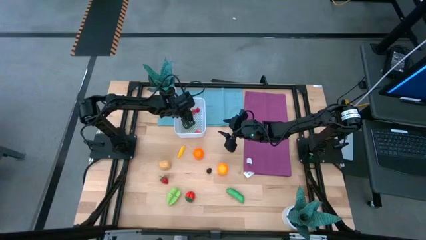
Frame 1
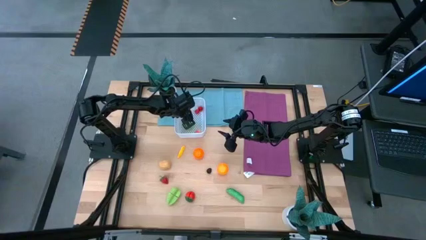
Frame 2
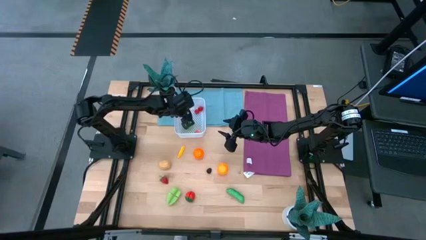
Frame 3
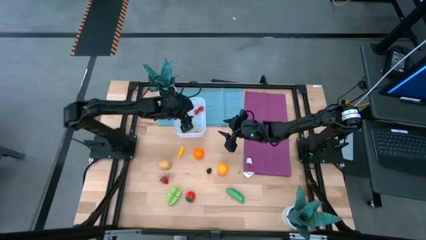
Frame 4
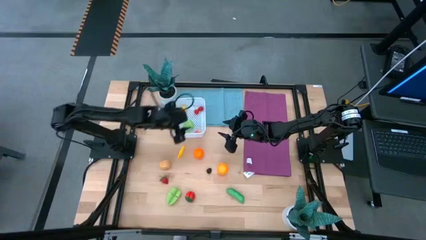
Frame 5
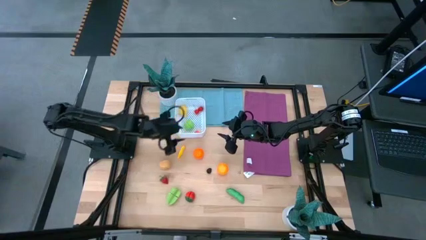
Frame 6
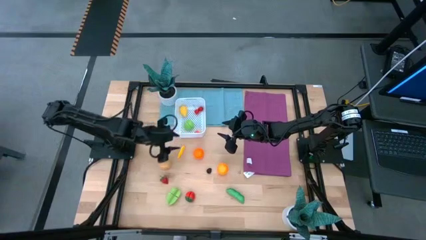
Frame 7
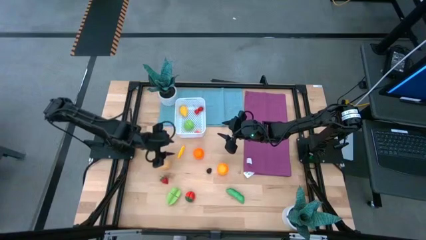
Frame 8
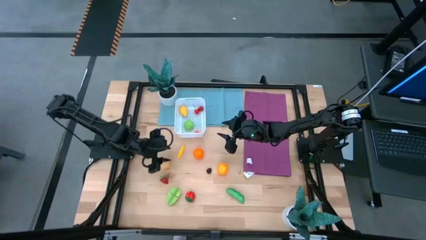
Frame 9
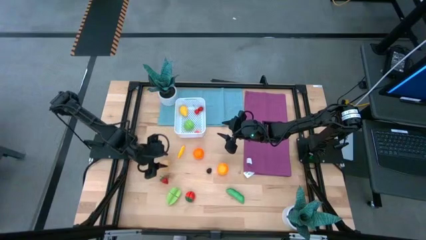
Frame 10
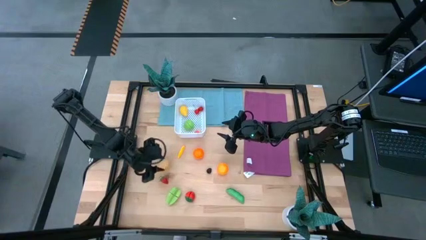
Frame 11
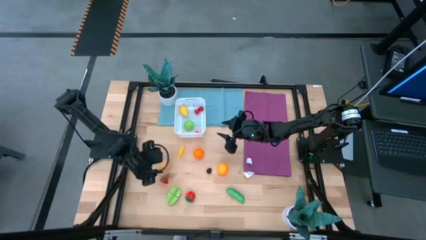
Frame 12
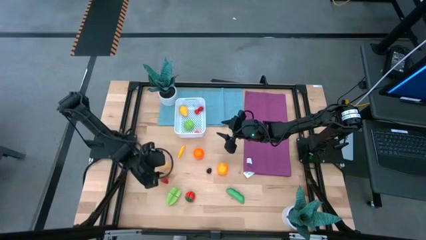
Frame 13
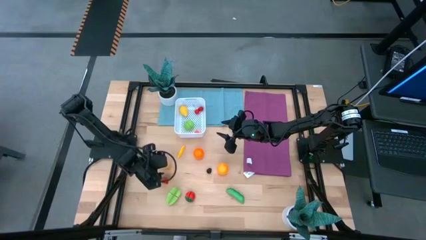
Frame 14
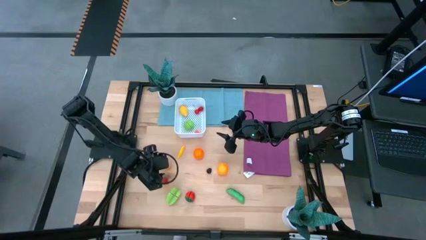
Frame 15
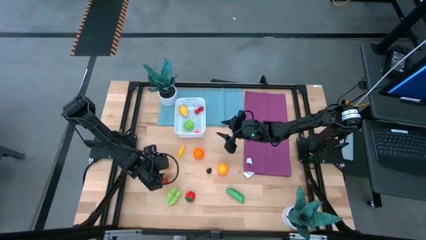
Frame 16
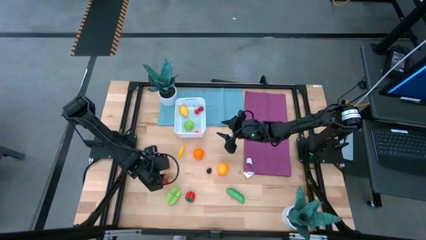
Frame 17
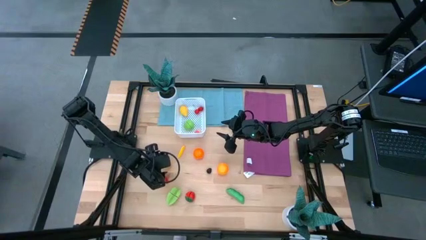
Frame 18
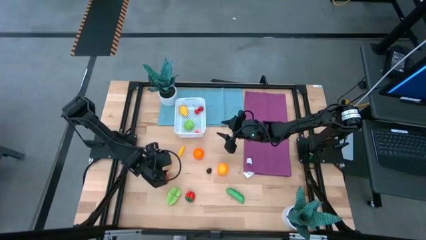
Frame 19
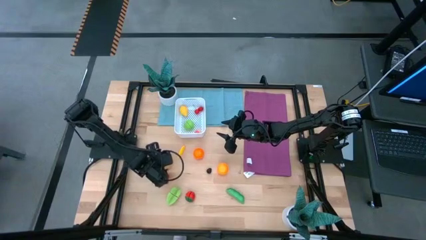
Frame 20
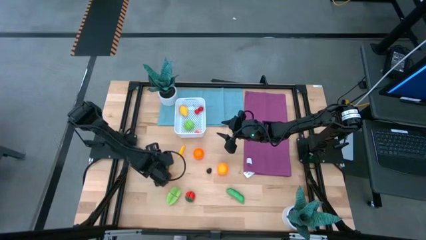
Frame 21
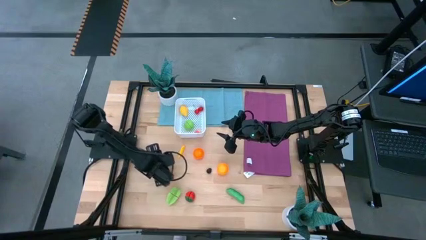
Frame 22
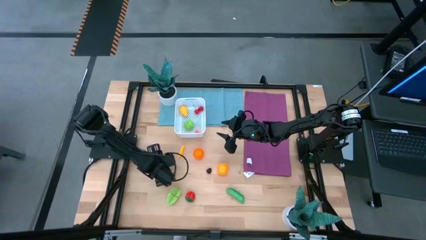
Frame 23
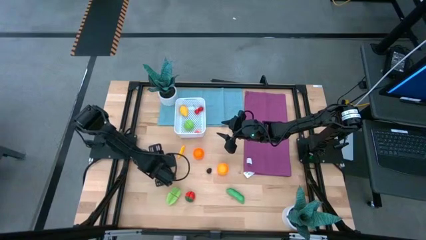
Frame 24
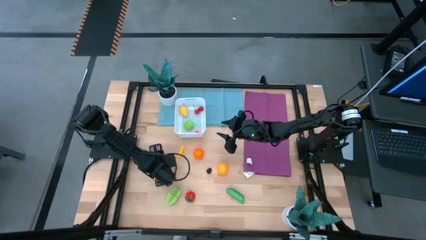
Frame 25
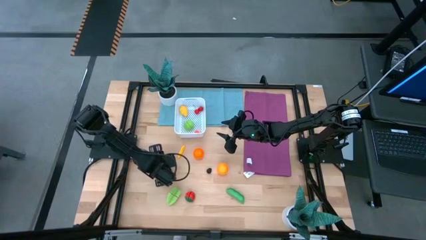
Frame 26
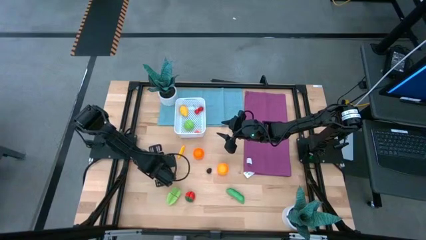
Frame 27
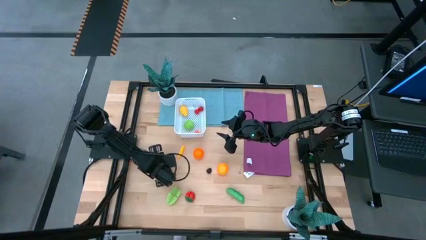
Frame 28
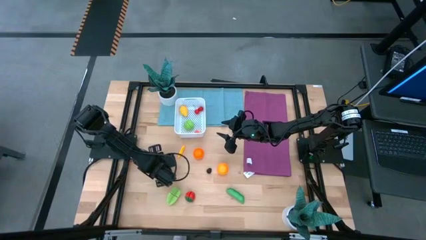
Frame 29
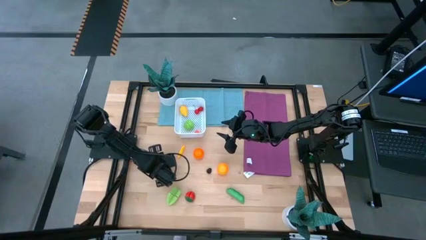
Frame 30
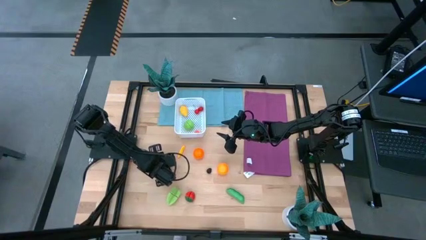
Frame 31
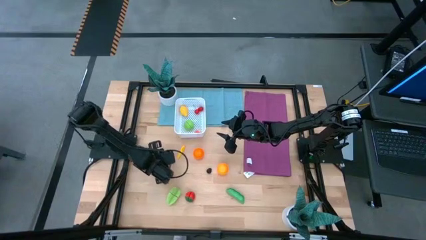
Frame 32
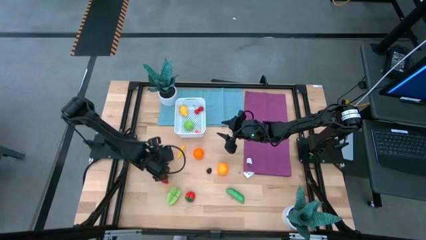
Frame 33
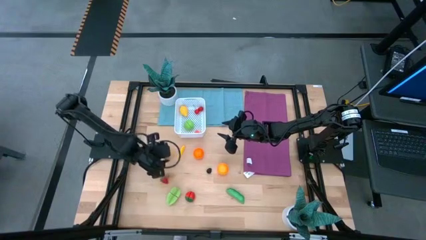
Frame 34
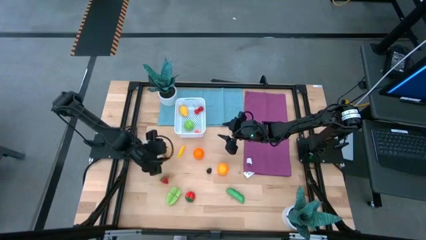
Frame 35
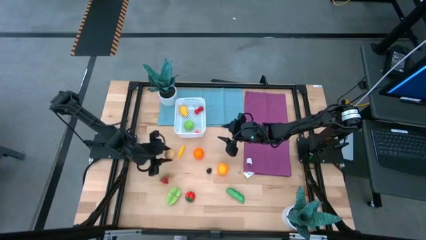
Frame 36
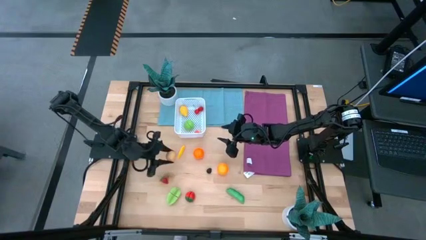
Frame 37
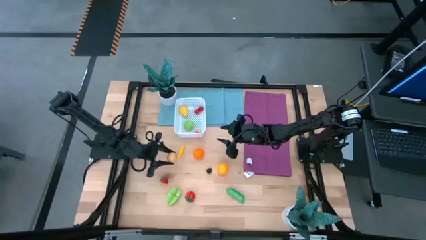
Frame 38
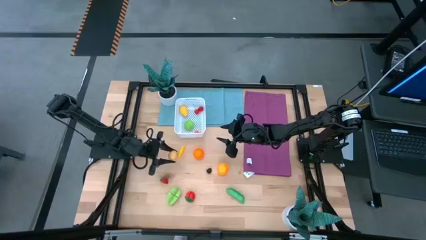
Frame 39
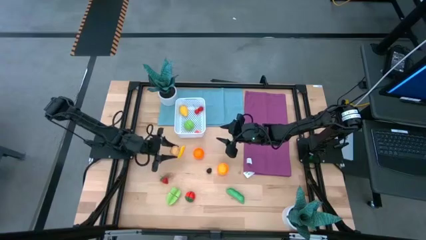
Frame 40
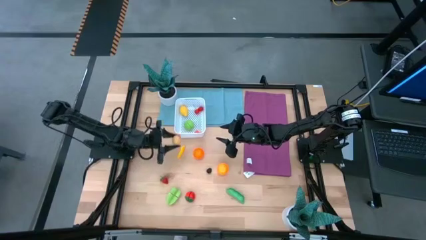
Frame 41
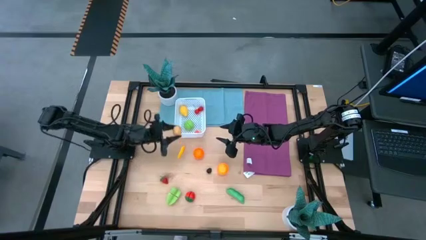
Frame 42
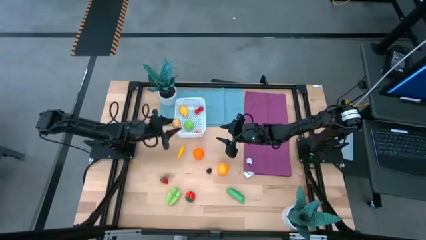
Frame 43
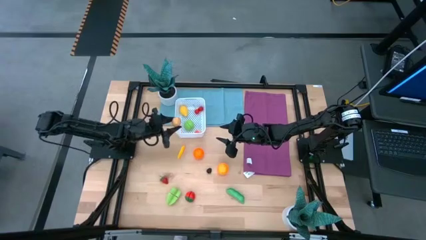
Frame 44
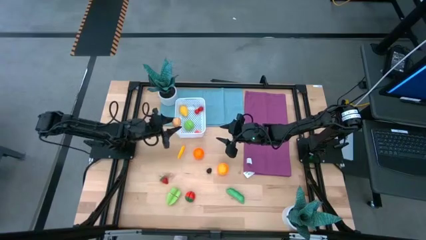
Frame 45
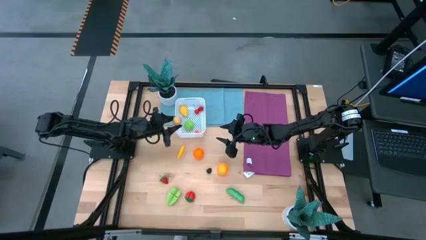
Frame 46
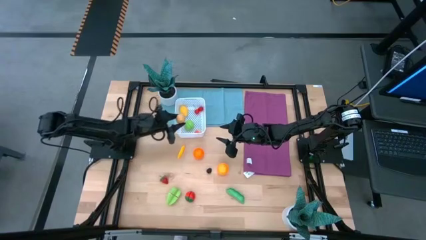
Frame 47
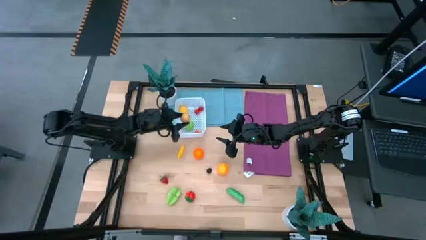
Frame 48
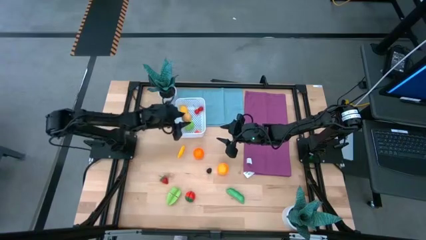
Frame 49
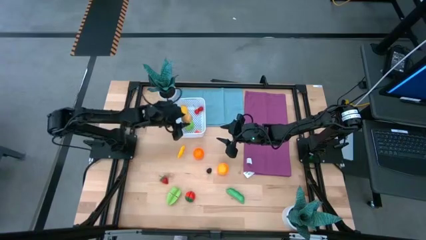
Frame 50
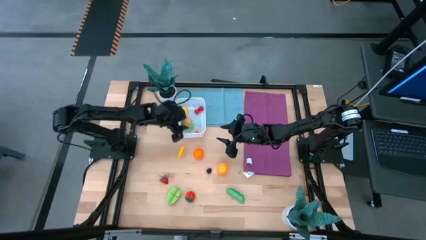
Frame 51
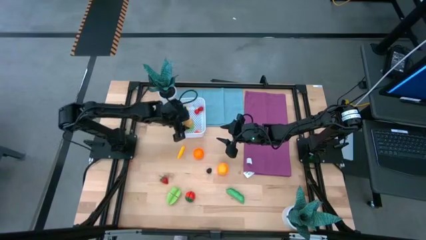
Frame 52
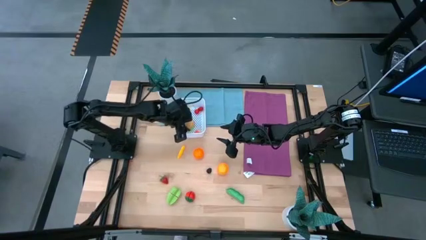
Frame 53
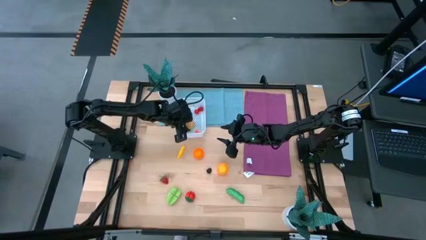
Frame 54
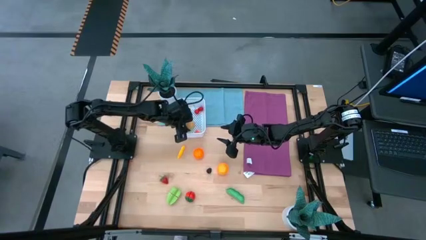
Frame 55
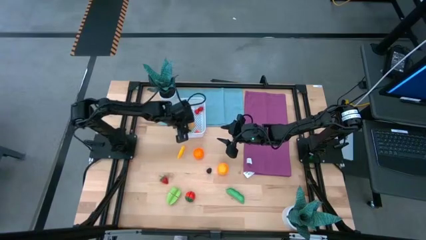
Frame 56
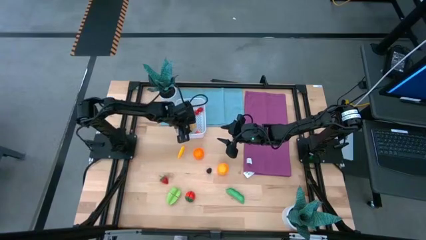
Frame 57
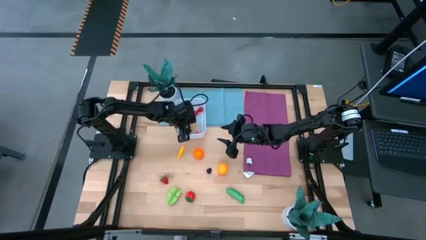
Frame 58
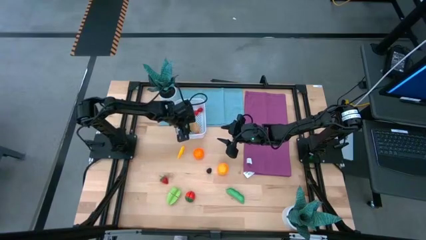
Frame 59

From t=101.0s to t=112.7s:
Task: Pick and placing Produce into tupperware
Put the brown potato into the white basket

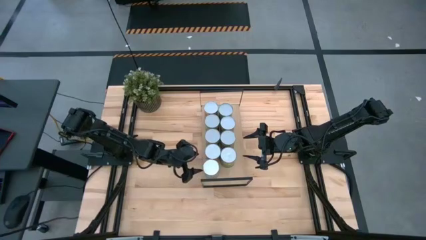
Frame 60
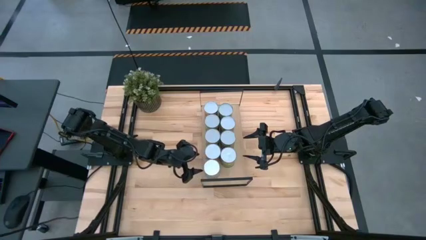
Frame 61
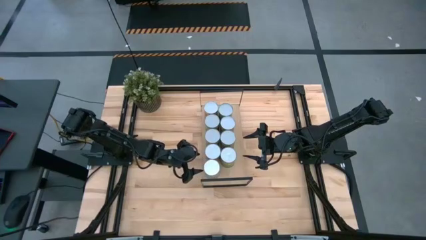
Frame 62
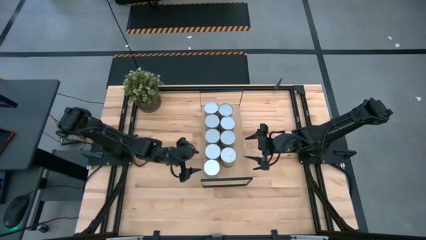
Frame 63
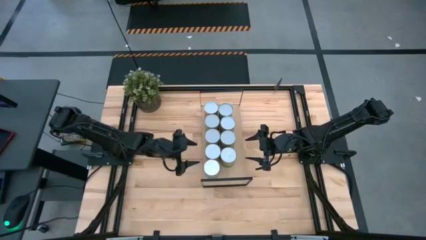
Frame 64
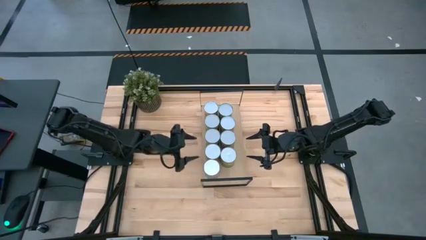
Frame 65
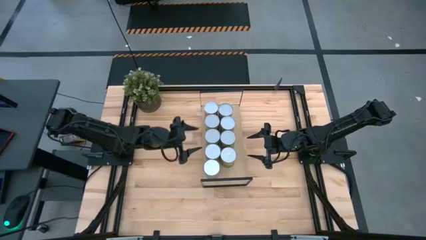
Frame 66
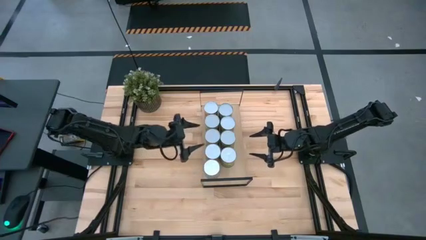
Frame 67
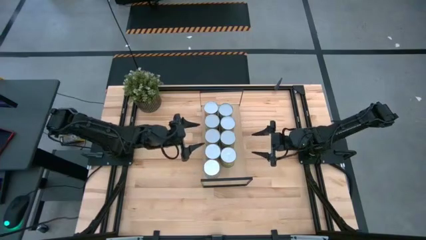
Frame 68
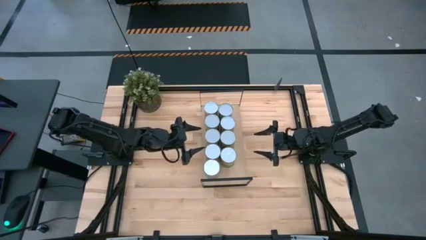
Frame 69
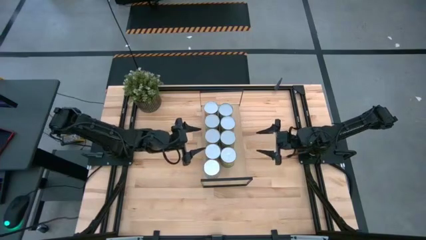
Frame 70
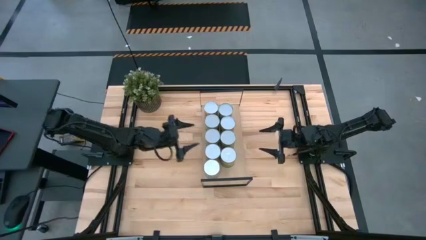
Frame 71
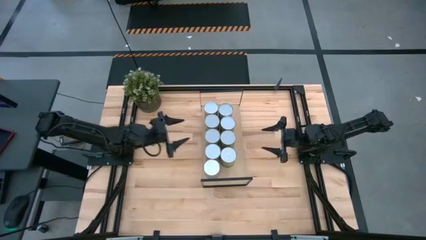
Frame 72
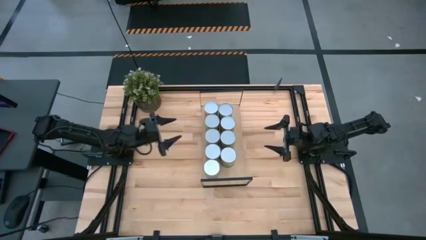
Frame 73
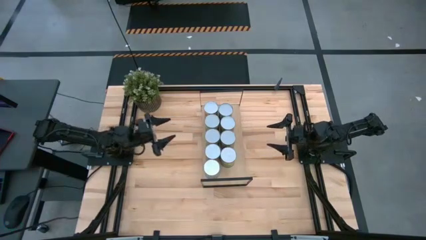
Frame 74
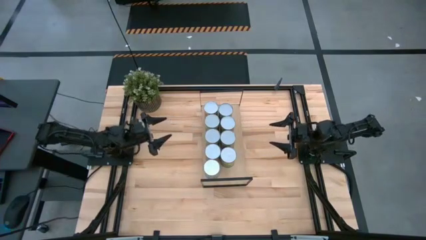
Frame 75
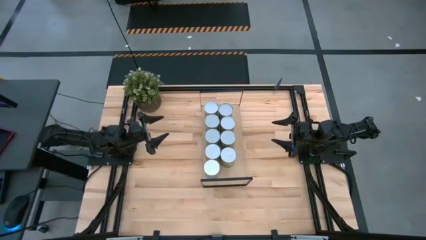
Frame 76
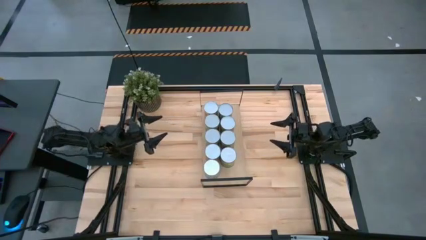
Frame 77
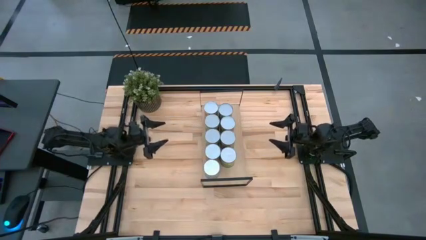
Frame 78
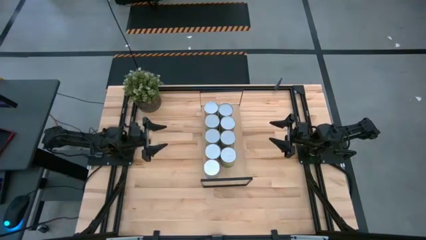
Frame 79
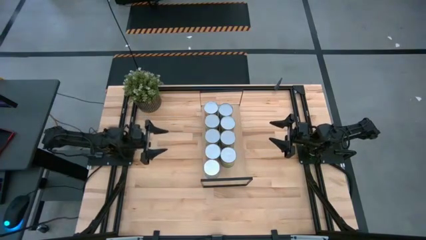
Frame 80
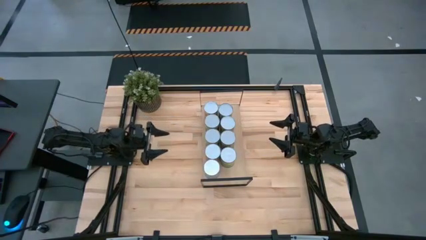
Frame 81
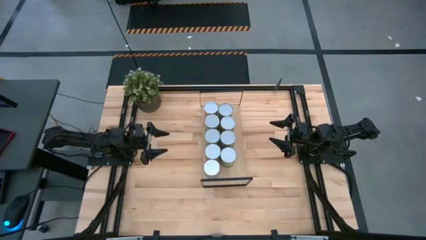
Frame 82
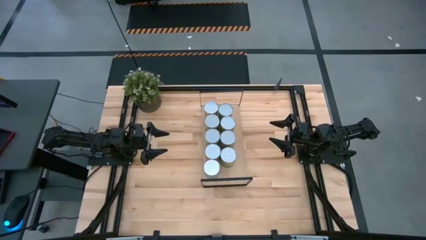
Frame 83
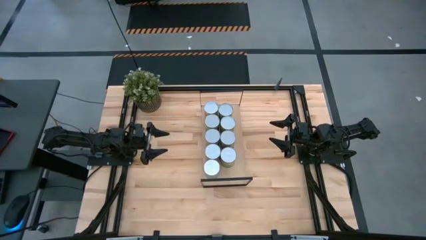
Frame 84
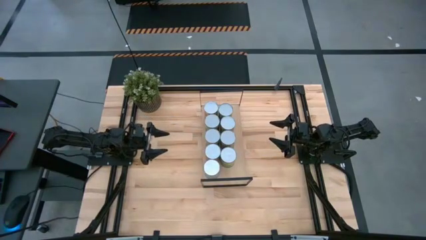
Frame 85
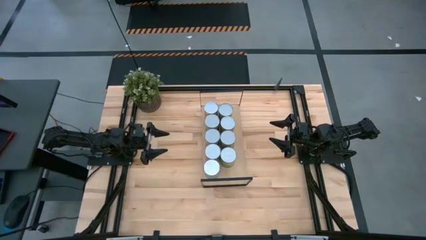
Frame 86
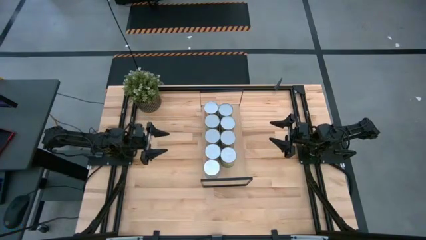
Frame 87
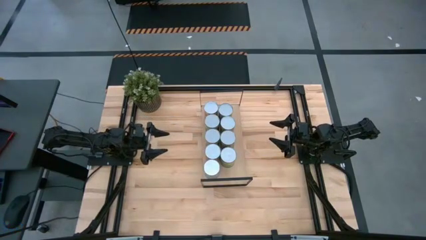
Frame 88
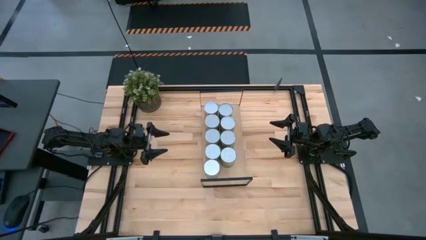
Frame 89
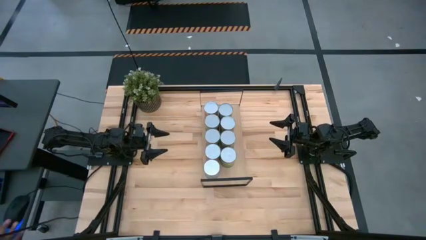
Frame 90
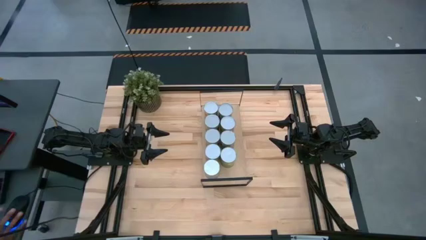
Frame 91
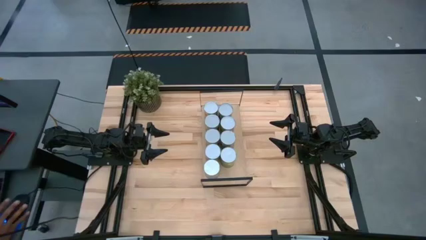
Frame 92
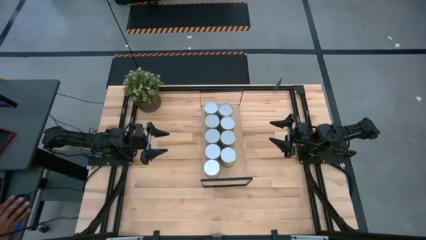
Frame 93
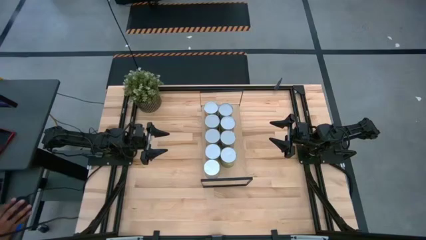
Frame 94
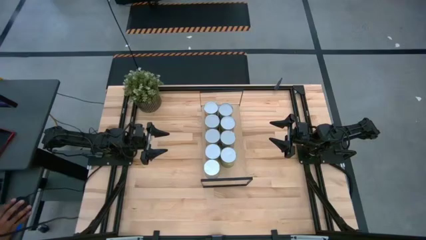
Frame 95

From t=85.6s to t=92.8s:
Task: Pick and place cans onto a shelf
Return to Home Position
